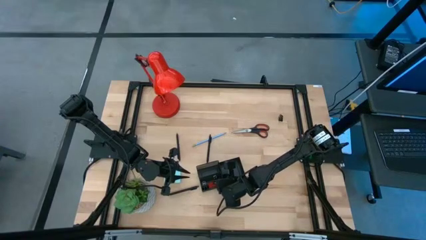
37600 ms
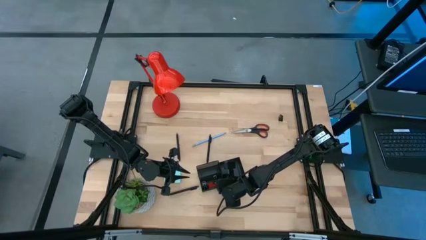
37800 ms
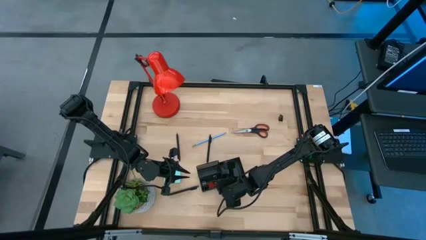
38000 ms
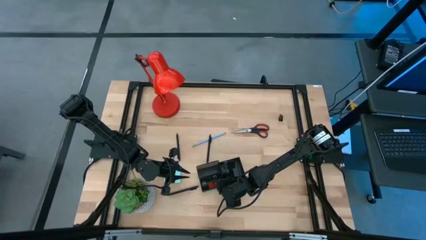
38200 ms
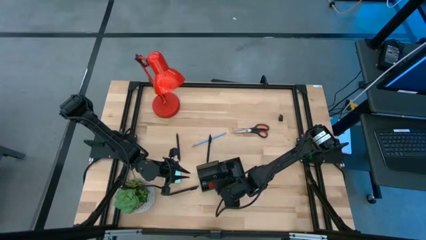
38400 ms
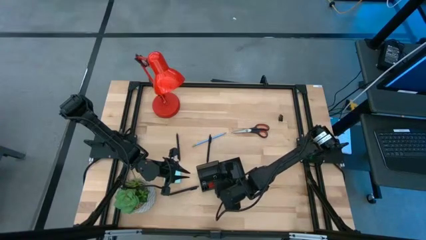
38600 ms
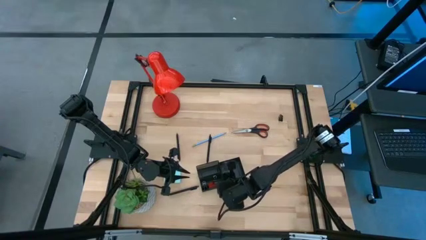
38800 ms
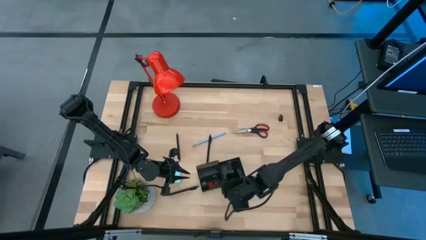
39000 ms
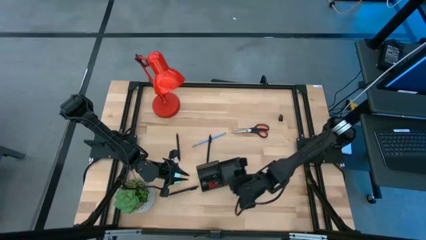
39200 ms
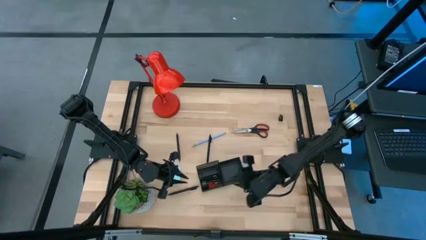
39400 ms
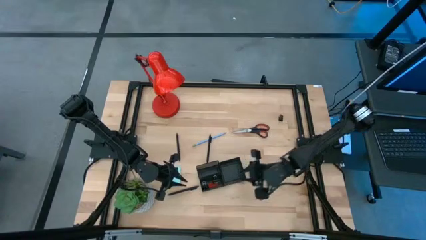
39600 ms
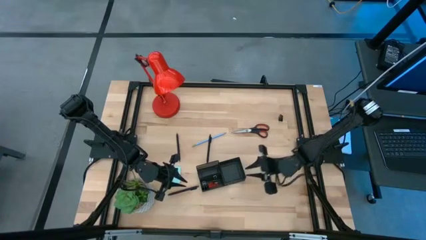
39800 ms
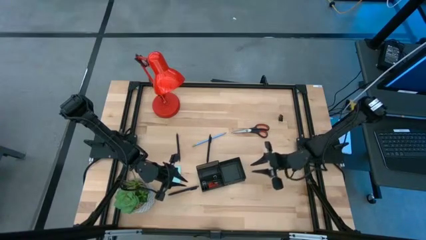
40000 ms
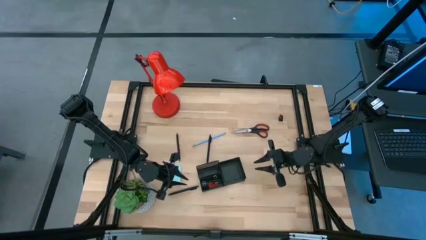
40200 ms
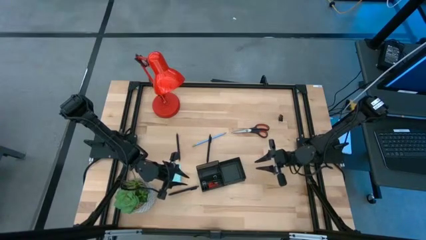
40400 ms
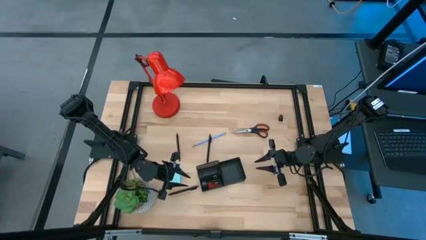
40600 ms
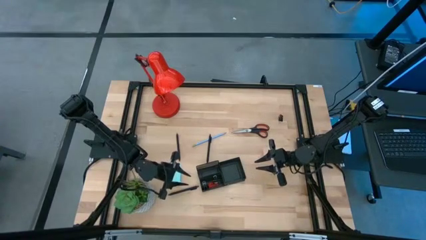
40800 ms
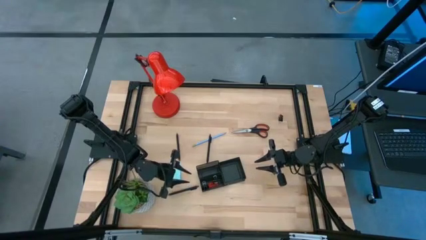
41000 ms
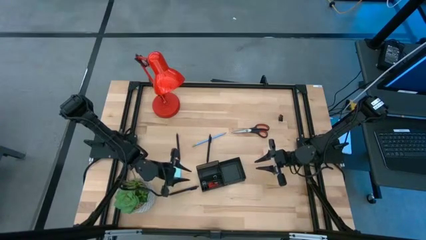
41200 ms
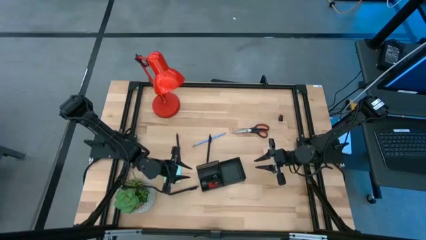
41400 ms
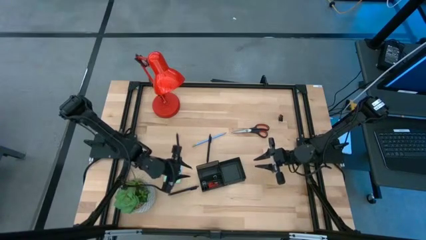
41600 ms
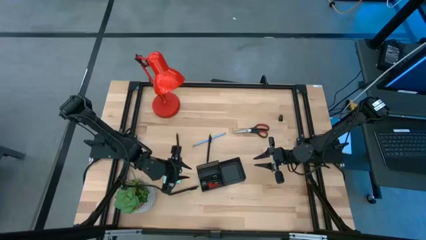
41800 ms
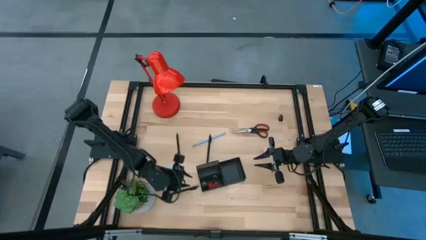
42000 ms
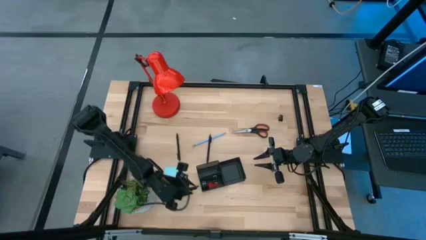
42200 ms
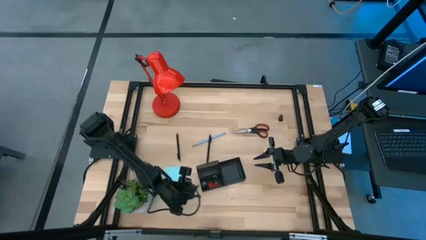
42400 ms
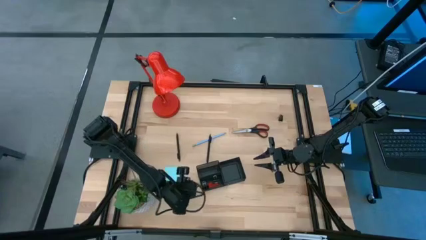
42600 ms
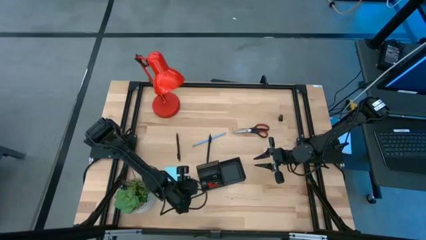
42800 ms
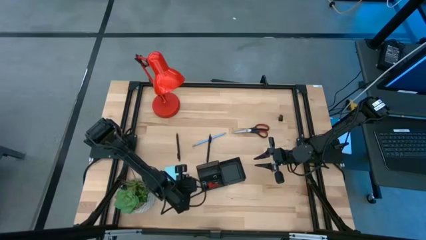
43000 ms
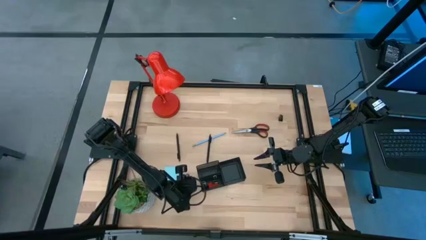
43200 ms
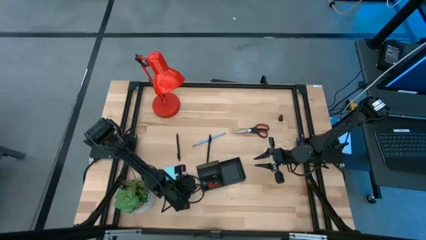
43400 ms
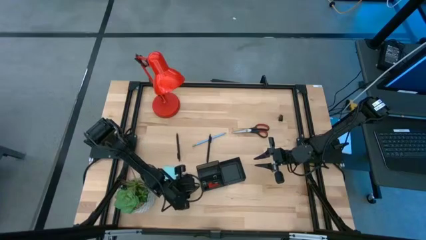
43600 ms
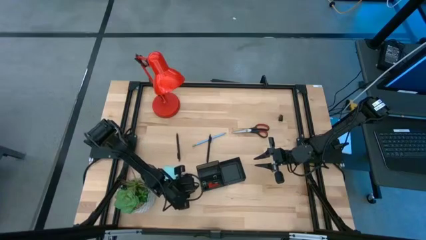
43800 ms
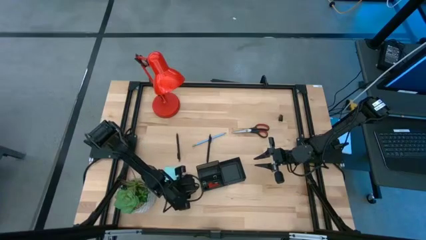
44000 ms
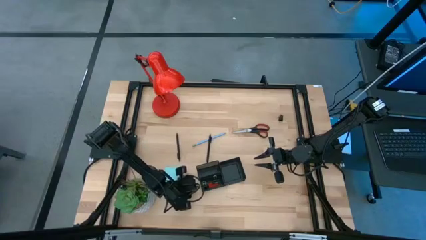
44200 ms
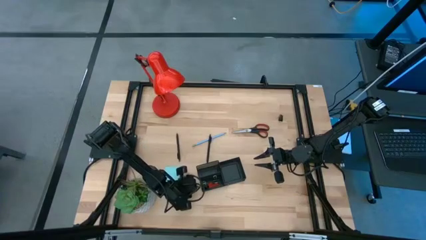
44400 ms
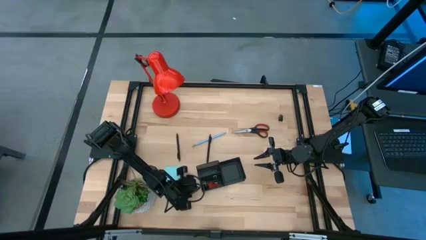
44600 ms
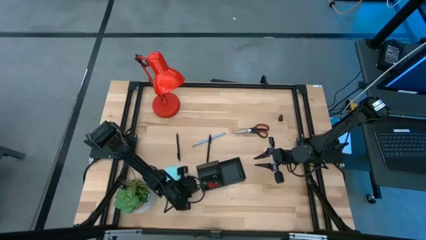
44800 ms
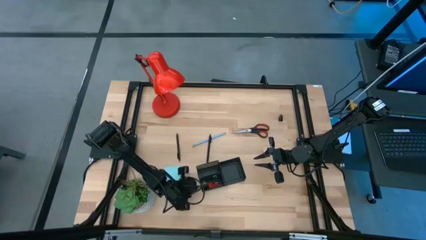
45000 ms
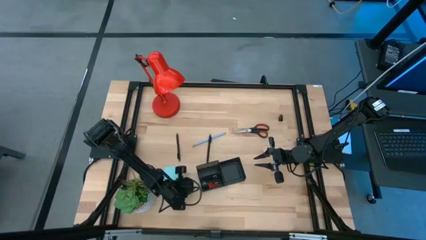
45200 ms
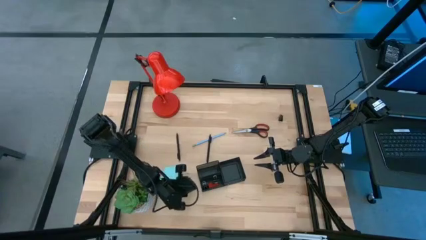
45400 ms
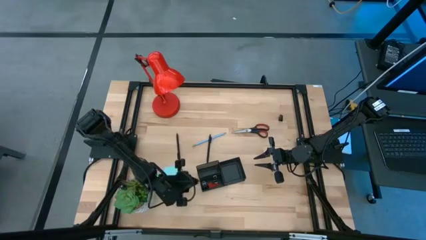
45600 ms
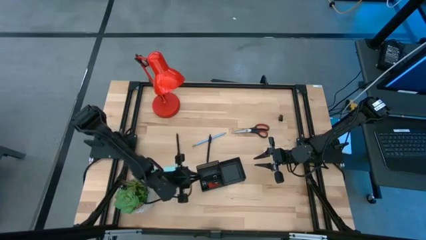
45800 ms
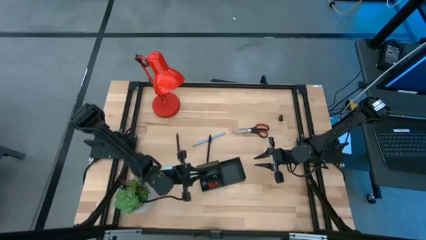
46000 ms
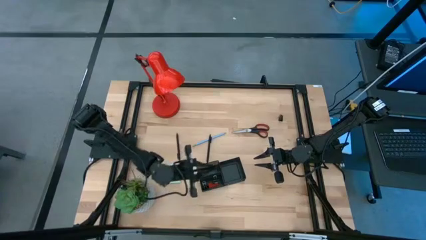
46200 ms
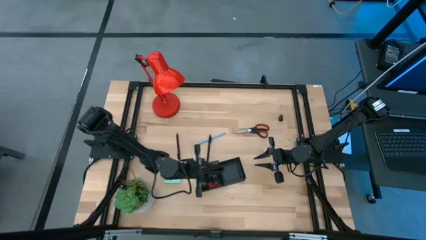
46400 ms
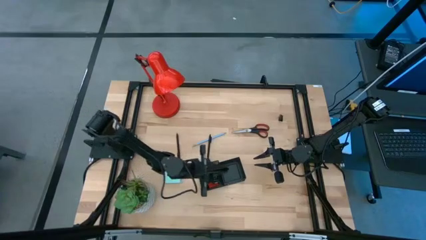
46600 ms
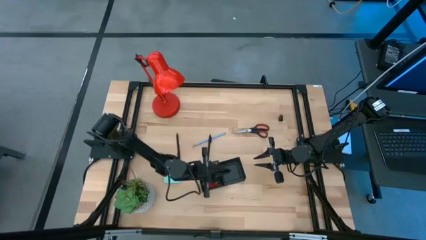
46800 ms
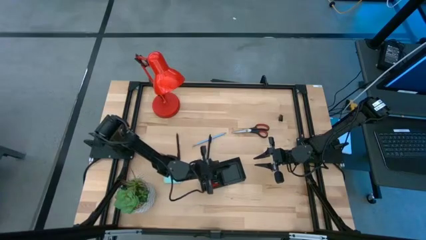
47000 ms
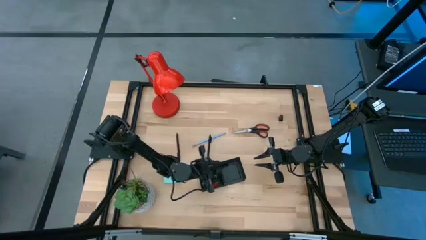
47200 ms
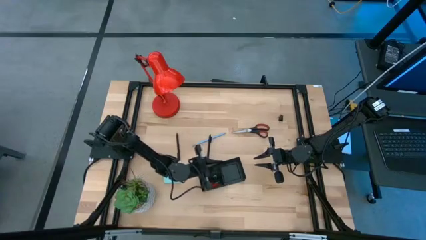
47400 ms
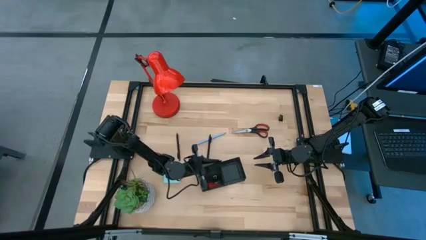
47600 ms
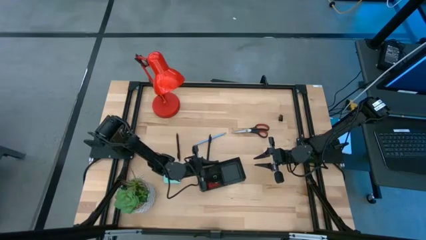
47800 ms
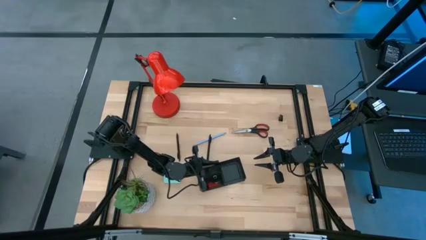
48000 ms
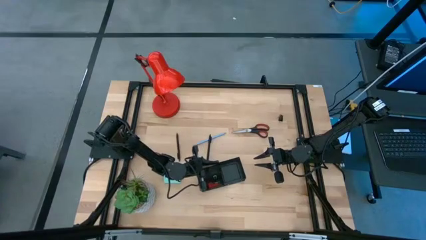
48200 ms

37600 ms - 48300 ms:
Task: Pick and place office supplies into organizer
Put the bottom black pen into the black desk organizer

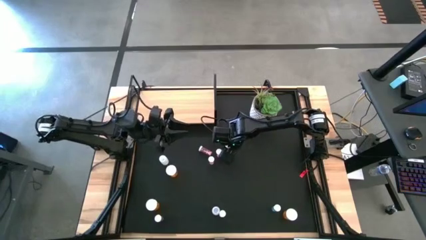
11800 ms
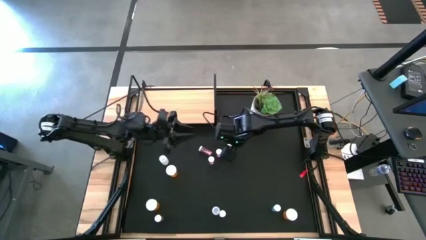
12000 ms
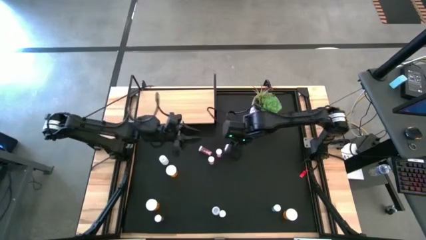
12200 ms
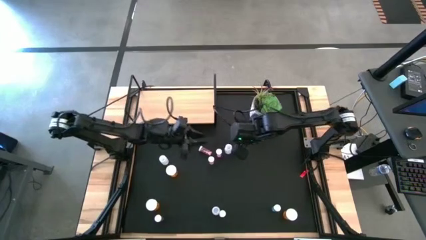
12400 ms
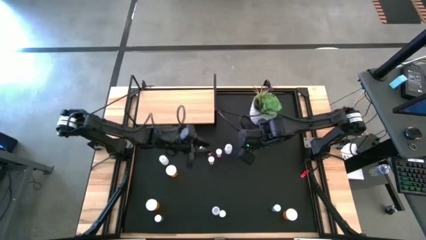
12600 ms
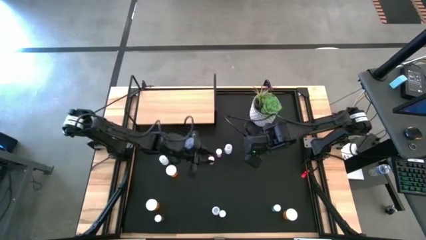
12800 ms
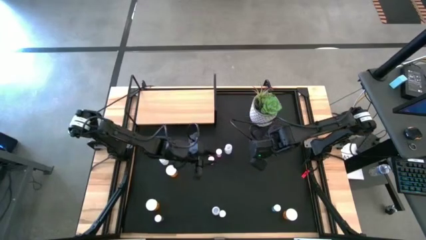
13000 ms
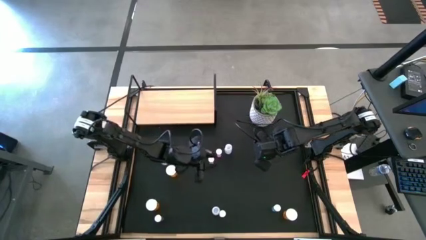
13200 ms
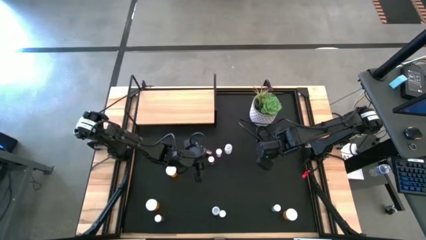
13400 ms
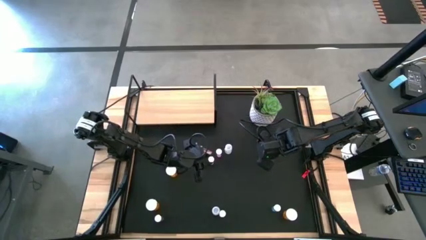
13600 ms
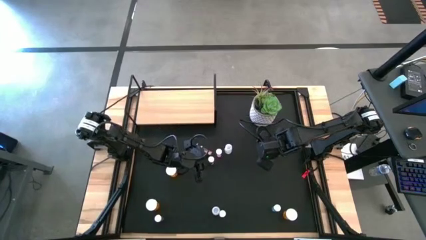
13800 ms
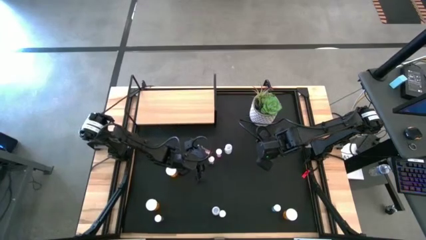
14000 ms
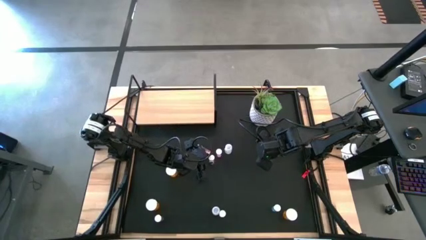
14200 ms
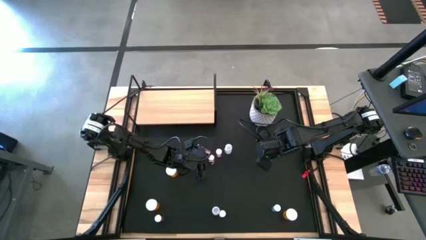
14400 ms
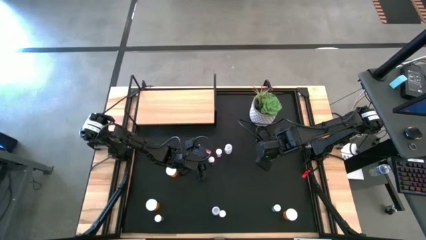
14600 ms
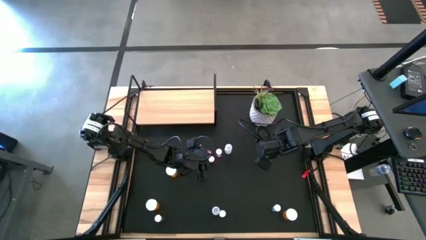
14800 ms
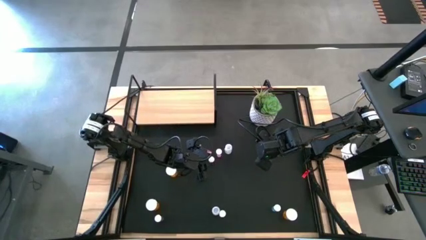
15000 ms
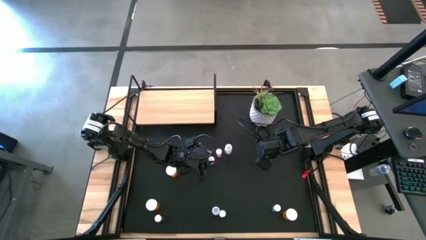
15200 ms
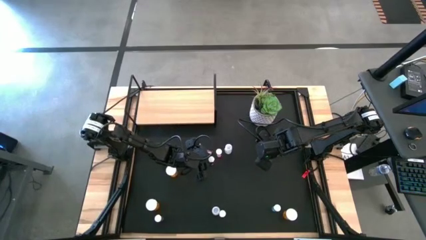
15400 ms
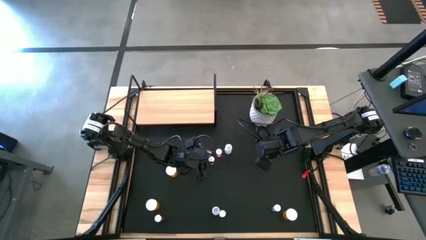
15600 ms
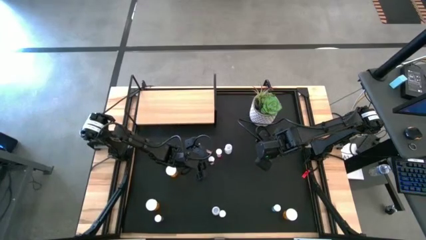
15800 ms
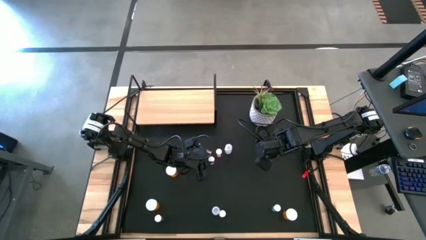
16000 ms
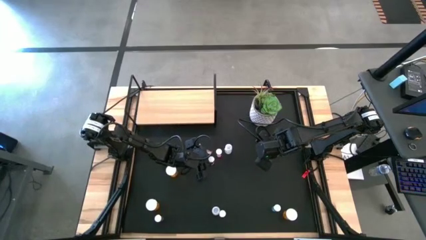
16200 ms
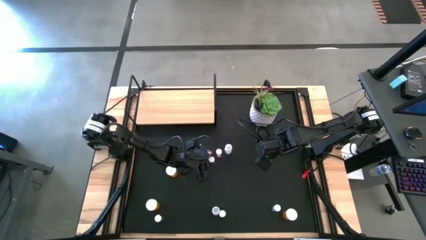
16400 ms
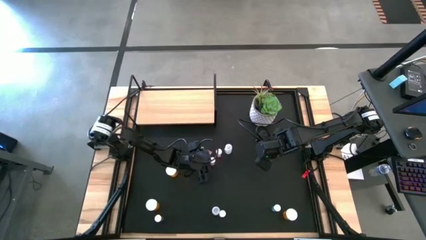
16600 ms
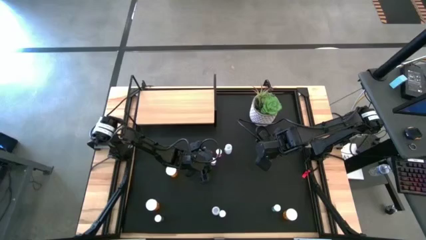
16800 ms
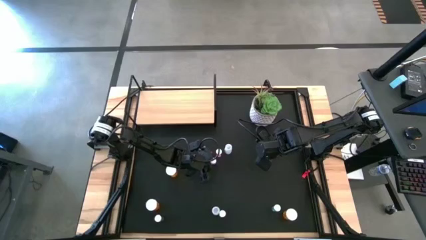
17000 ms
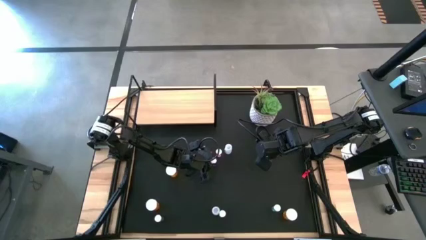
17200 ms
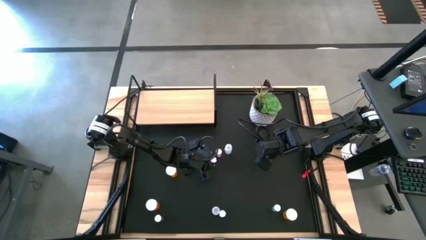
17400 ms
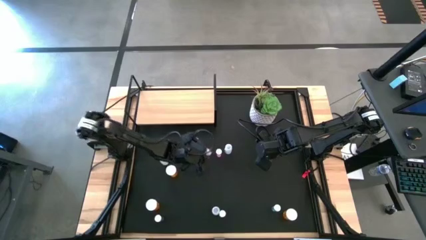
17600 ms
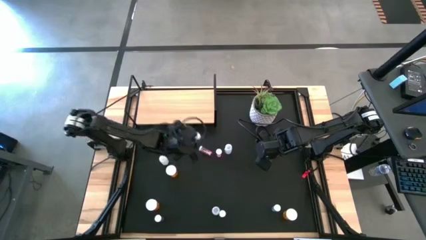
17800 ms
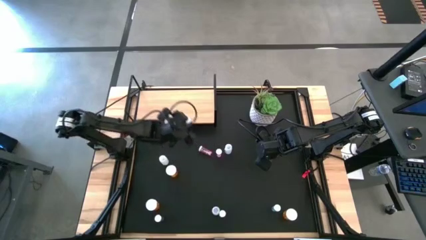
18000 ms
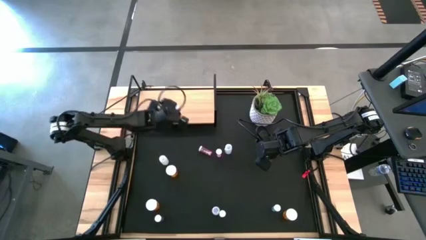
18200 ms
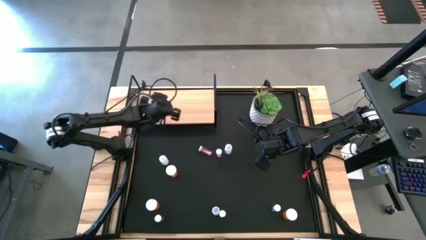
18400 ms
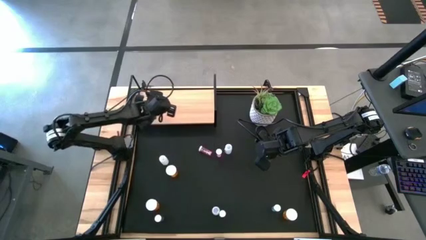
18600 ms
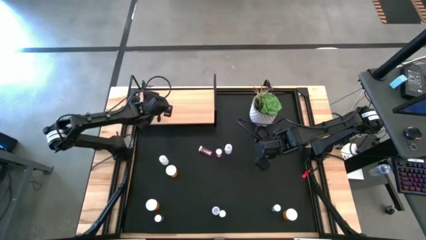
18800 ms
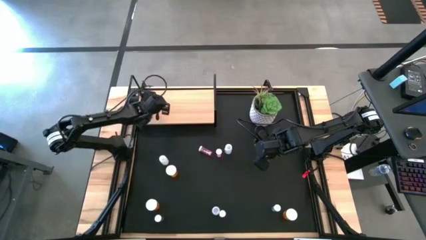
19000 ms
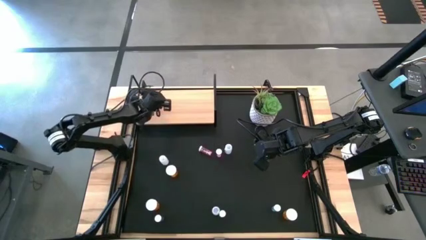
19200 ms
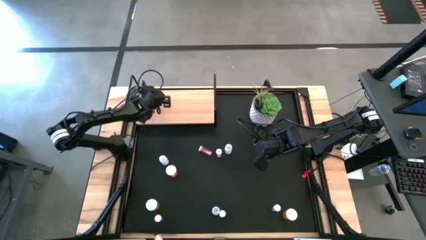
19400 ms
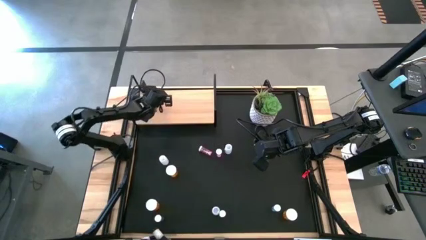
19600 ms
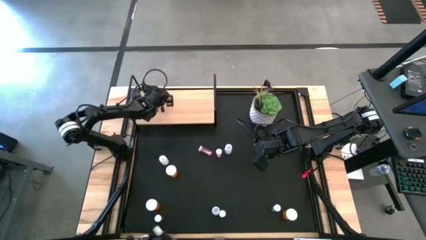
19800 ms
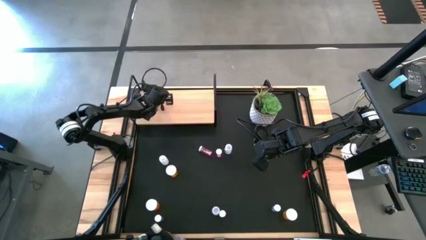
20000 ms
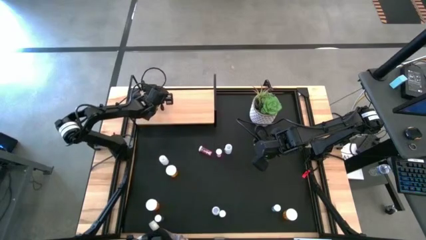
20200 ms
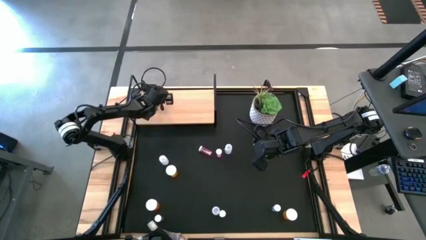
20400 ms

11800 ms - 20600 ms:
Task: Pick and place medicine bottles onto shelf by color
Put the bottom pink pill bottle on the shelf
